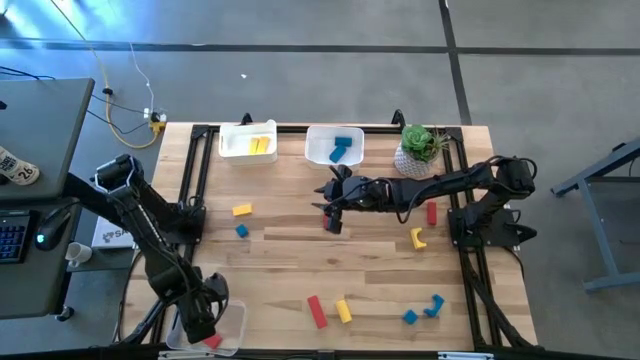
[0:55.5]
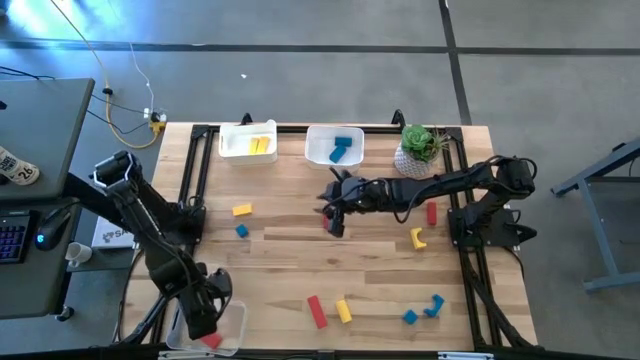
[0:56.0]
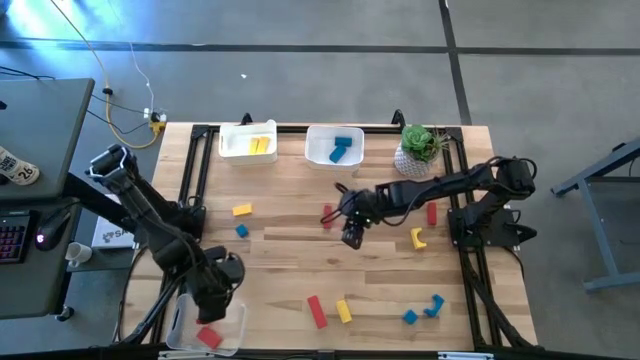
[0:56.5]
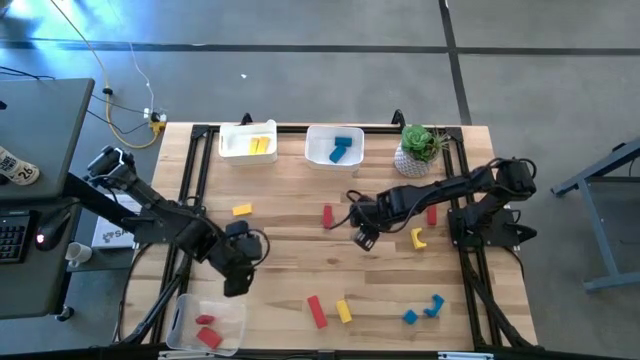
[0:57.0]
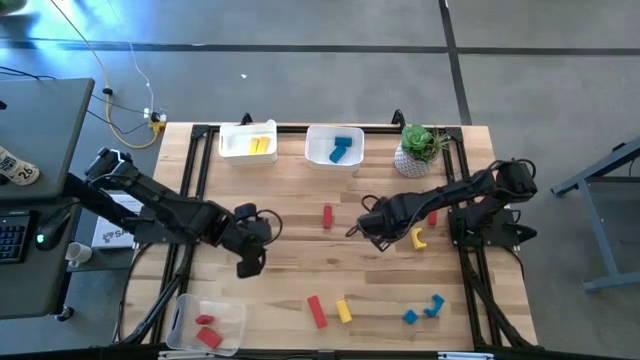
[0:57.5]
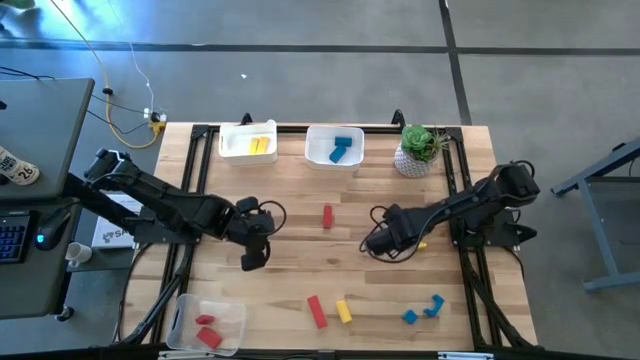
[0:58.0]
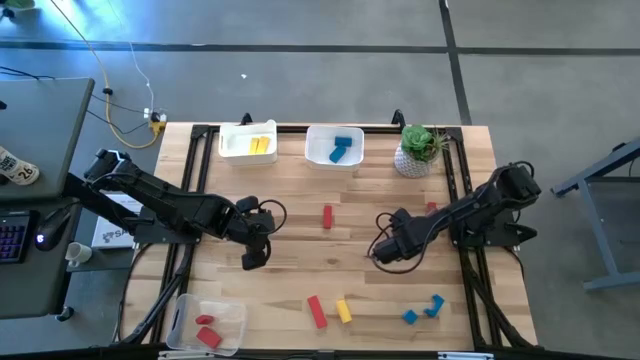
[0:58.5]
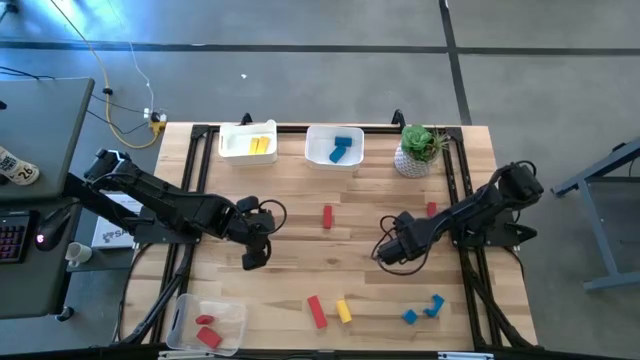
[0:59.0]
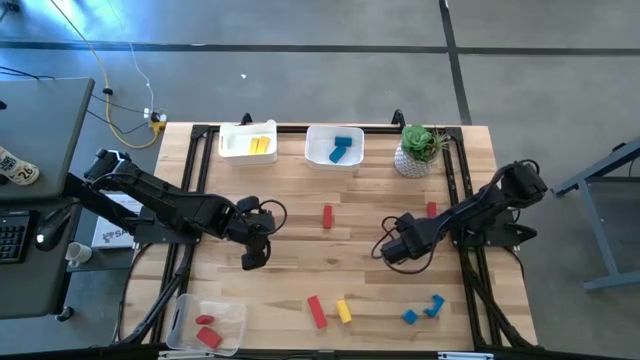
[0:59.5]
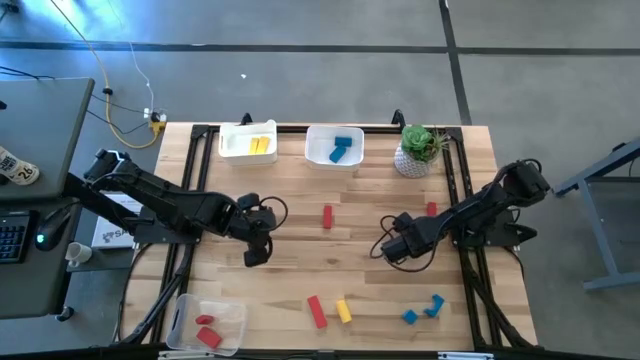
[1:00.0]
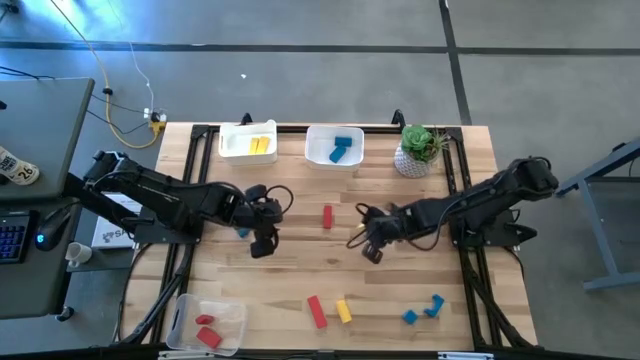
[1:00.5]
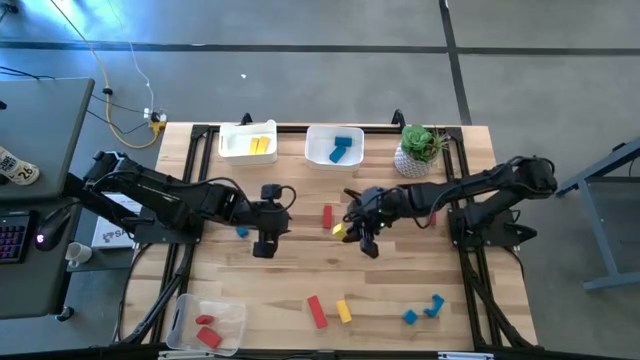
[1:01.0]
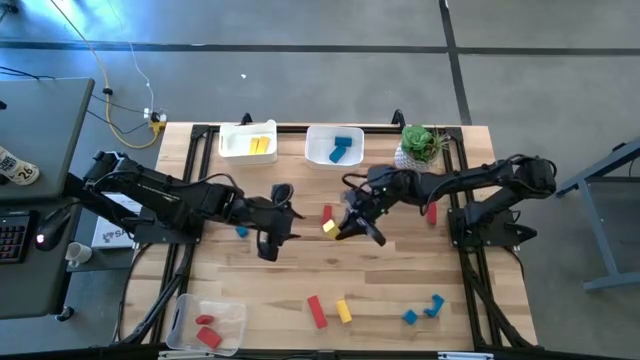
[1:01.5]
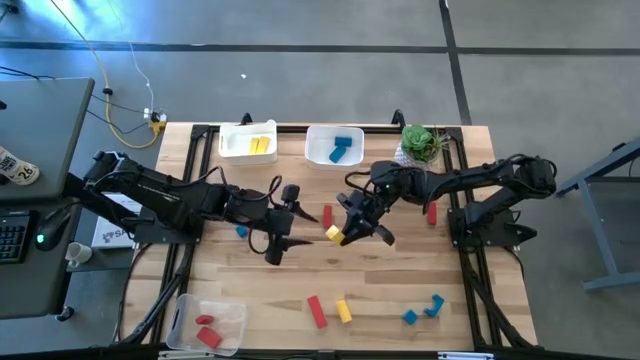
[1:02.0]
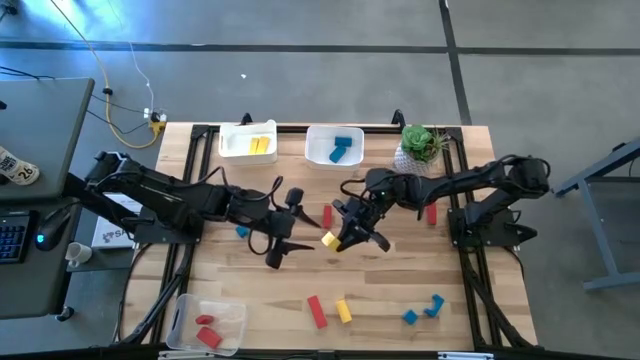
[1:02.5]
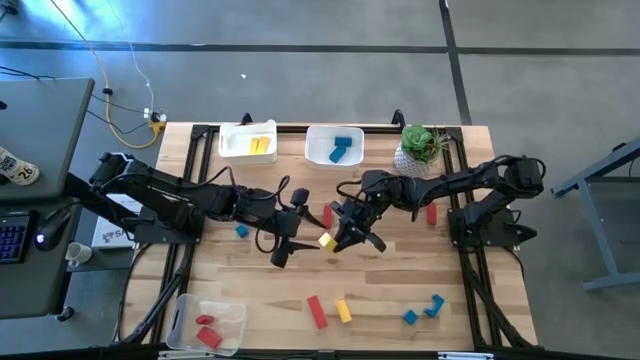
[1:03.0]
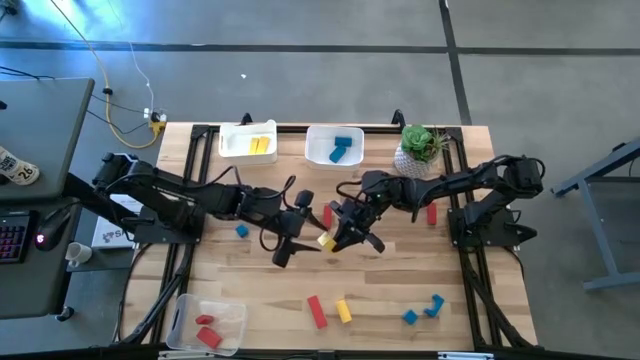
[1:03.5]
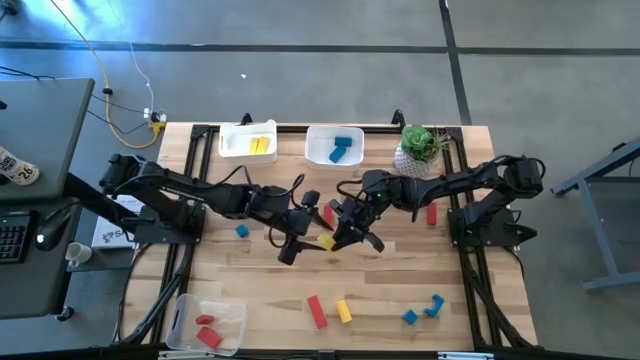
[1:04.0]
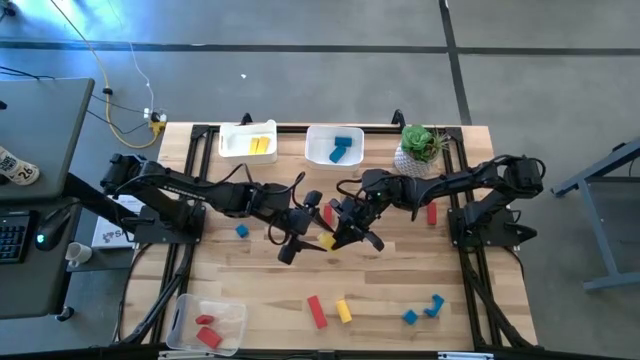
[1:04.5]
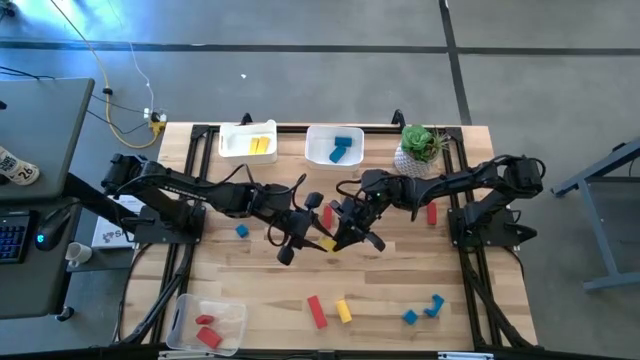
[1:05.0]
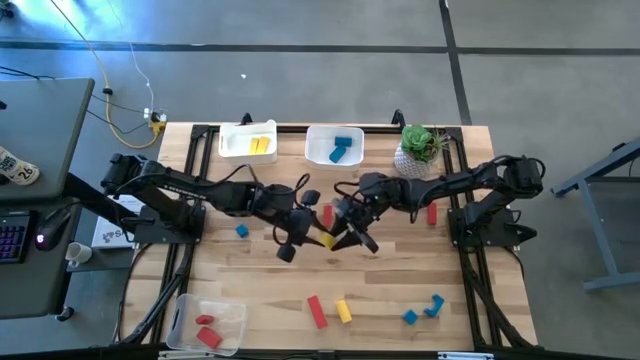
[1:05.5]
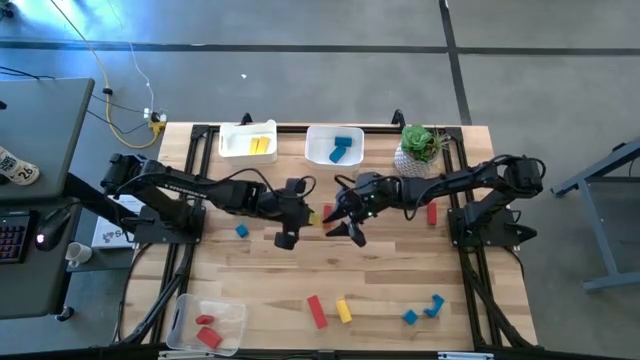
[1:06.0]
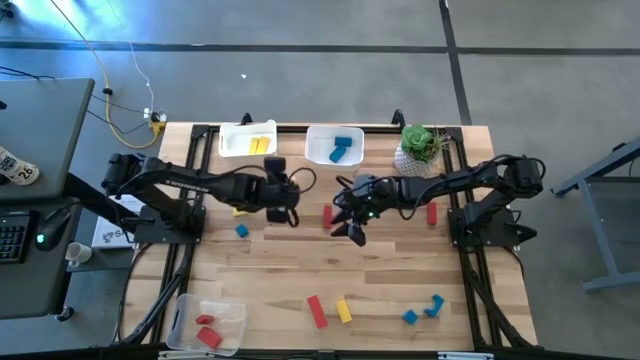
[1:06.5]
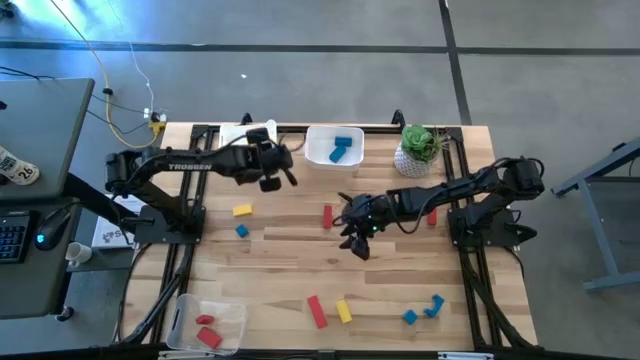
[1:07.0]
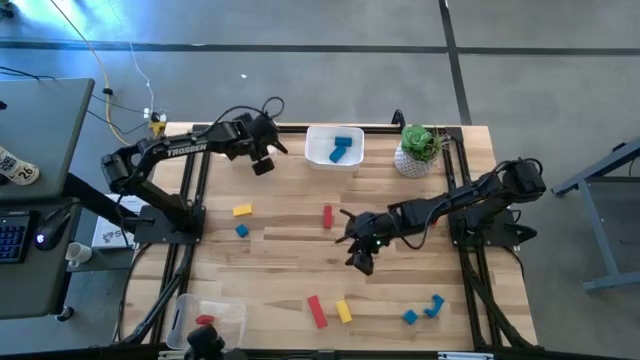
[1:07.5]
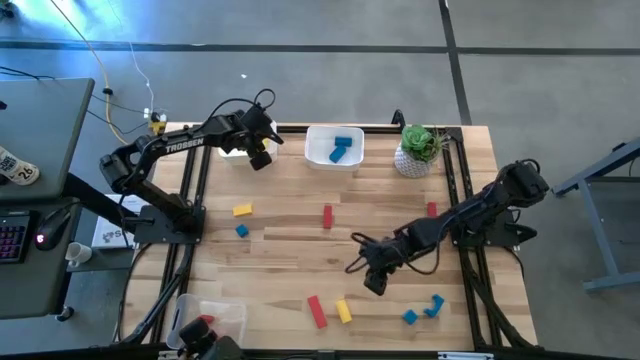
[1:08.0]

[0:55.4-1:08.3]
Task: Sort & place blocks by color
Put the yellow block into the left white bin

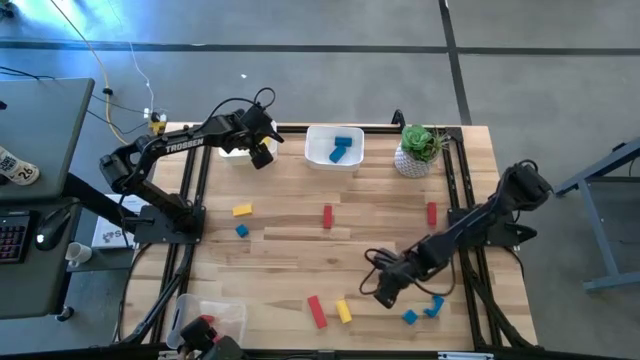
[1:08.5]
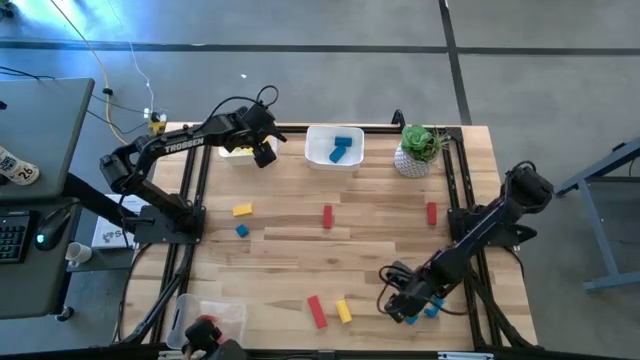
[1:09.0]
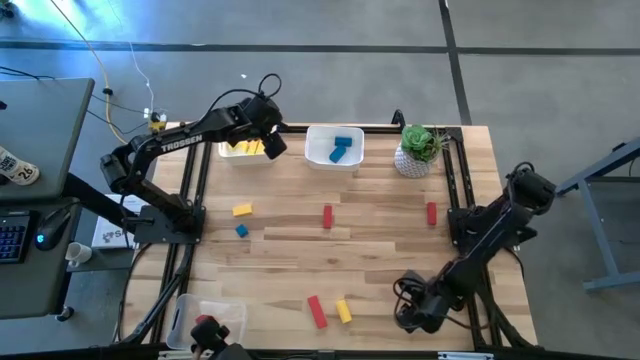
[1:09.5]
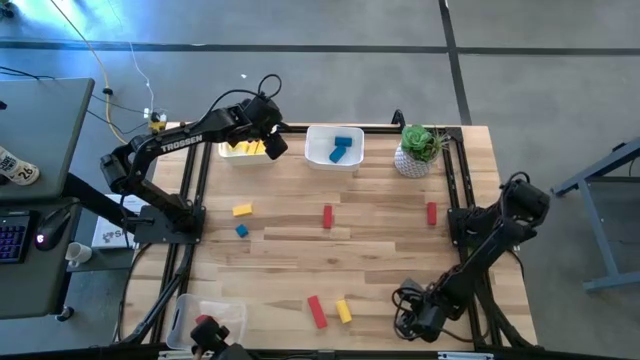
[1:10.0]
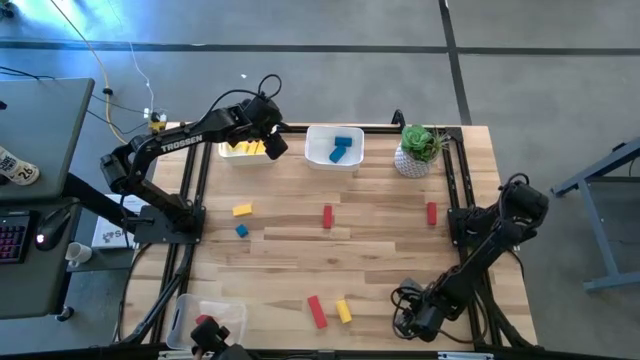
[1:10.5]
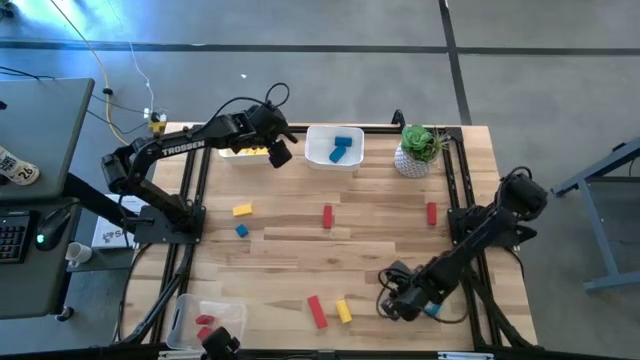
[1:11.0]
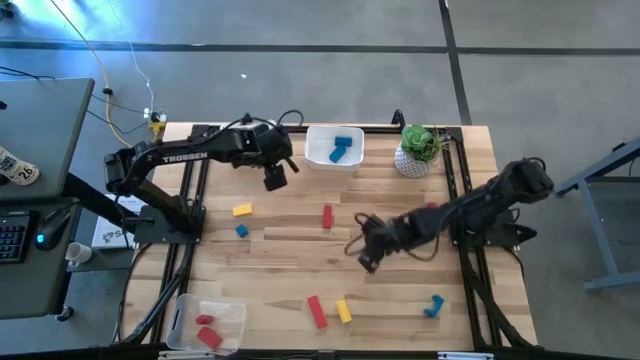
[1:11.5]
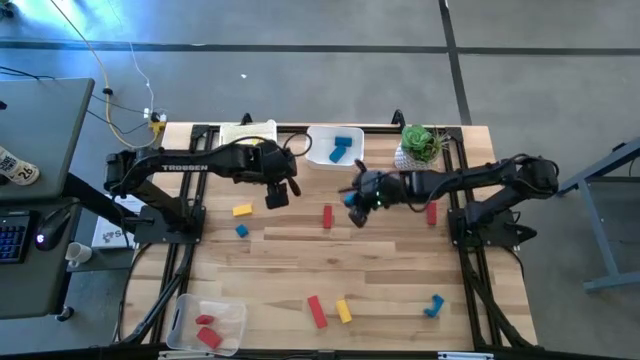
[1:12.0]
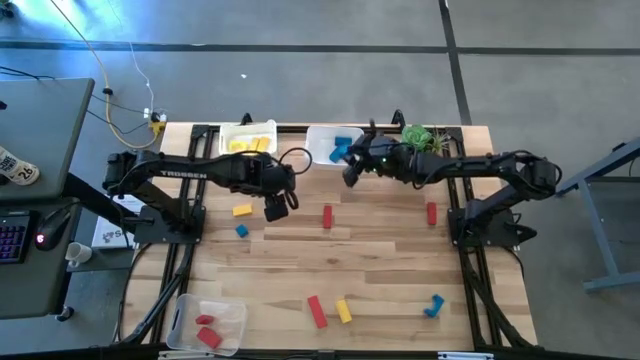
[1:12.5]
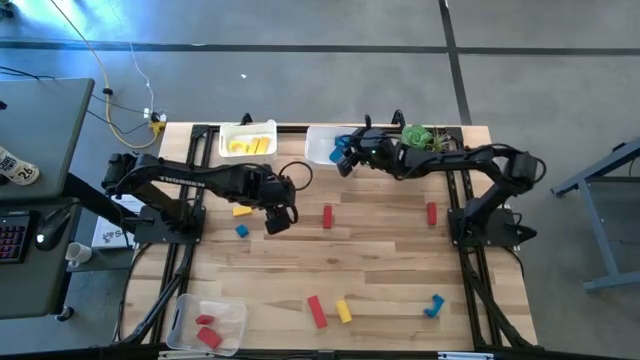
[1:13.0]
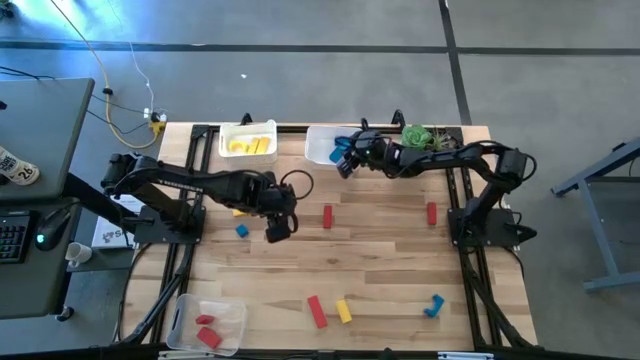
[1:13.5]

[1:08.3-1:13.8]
Put the blue block into the right white bin

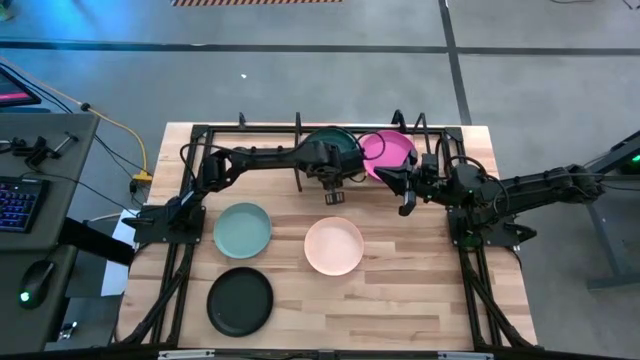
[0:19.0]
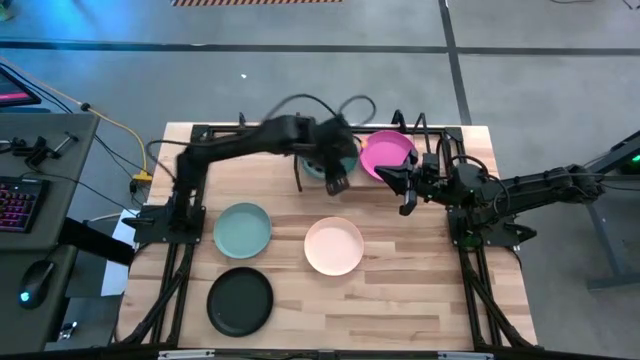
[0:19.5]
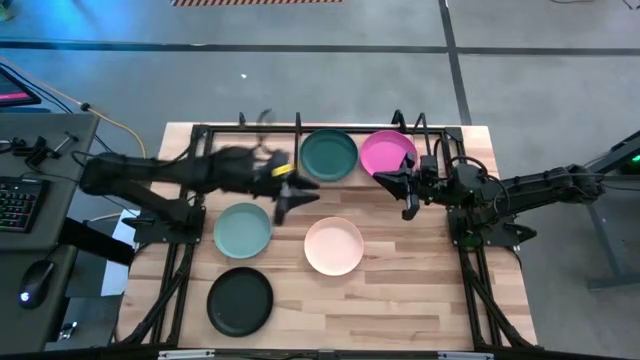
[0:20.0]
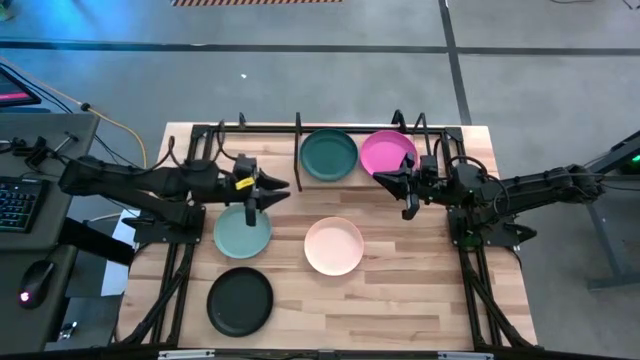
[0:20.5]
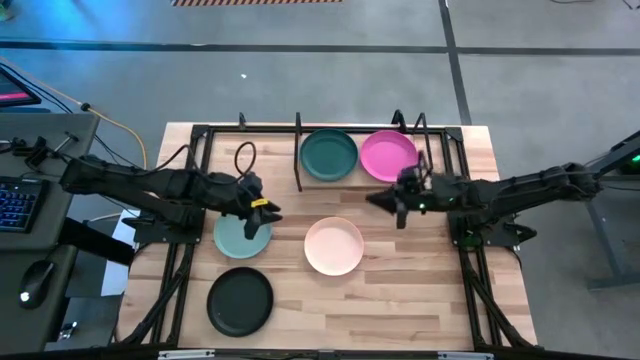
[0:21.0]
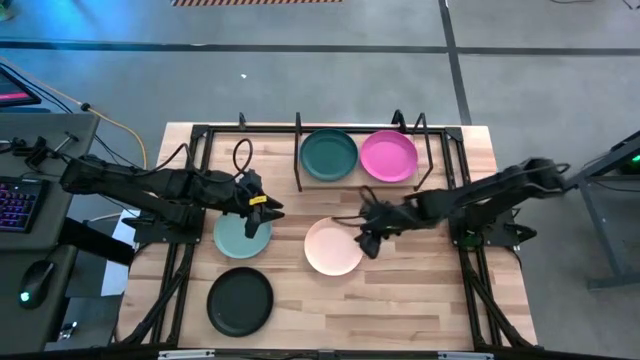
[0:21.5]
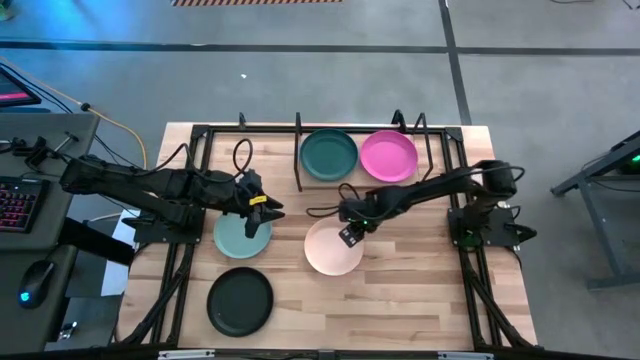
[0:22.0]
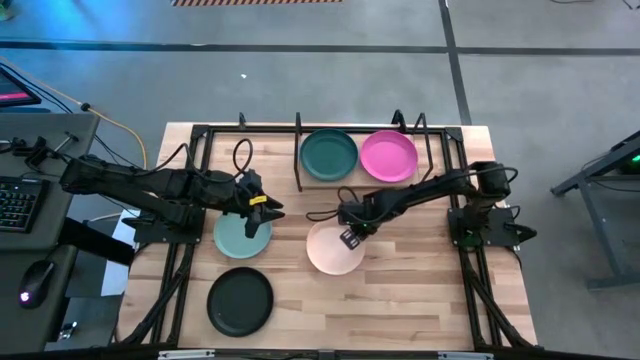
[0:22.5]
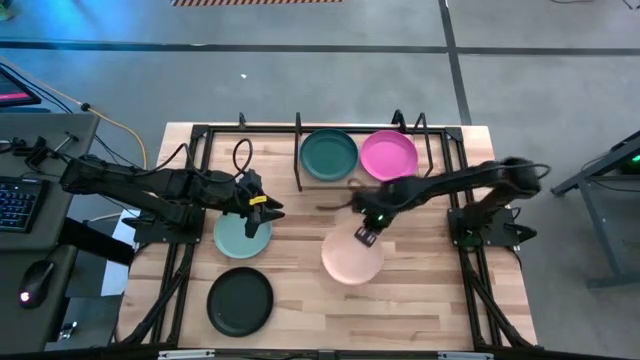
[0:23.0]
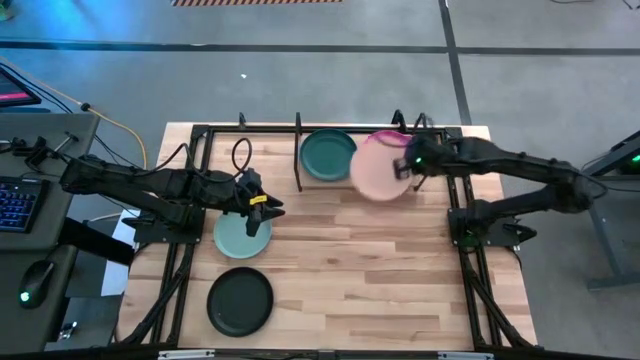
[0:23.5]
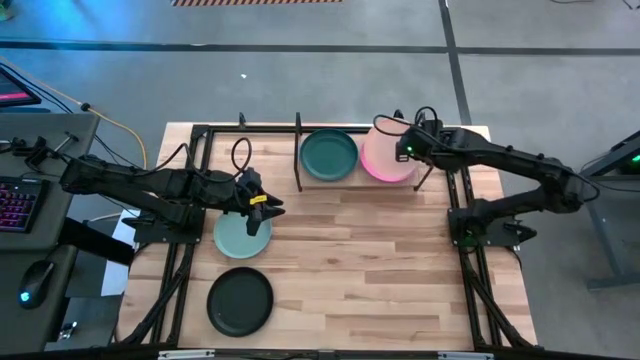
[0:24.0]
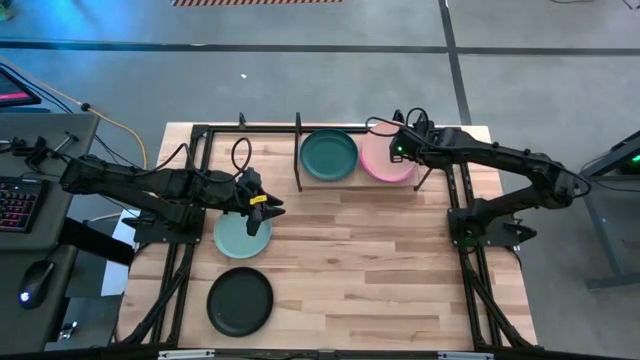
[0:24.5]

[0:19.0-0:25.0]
Task: Place and stack plates onto a shelf
Stack the light orange plate on top of the pink plate
